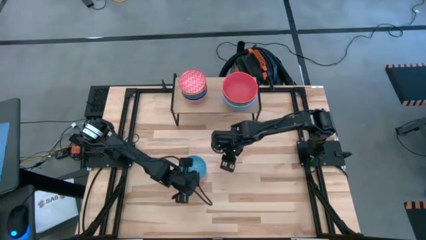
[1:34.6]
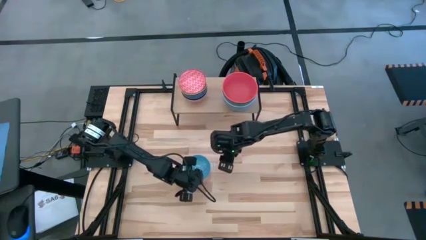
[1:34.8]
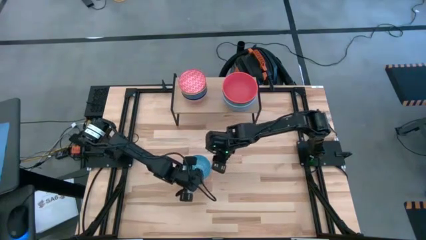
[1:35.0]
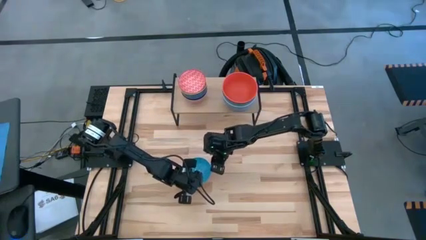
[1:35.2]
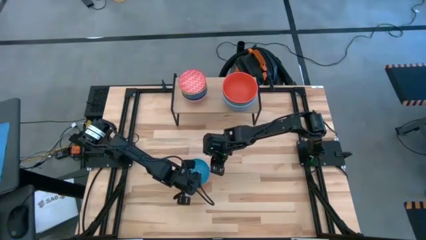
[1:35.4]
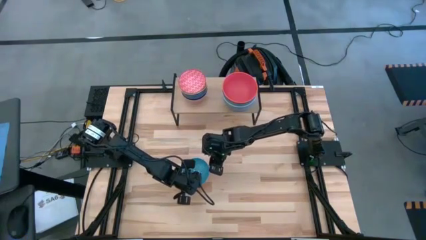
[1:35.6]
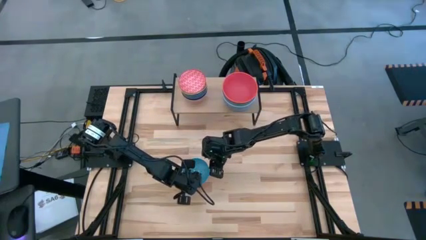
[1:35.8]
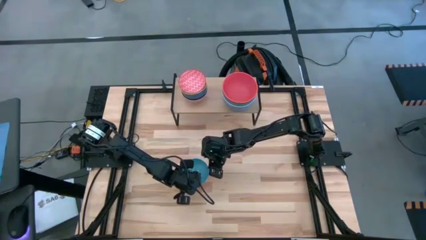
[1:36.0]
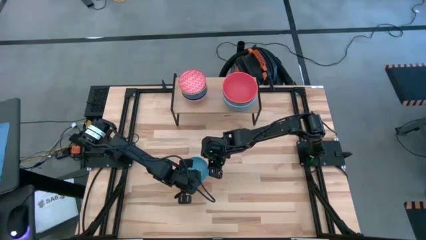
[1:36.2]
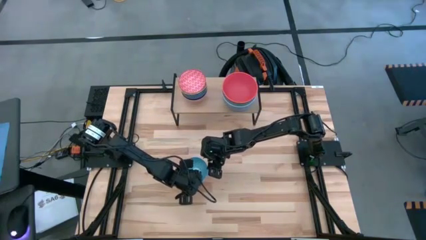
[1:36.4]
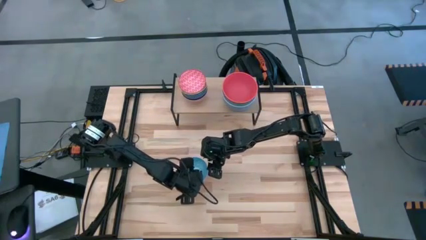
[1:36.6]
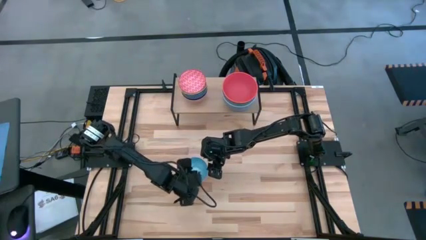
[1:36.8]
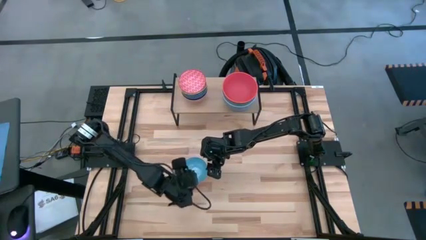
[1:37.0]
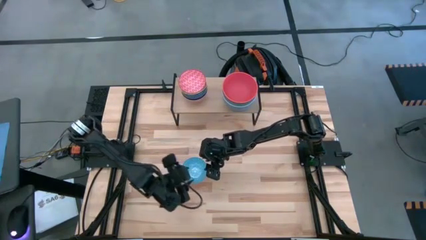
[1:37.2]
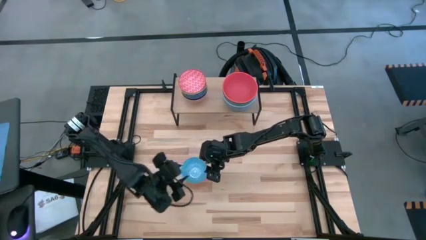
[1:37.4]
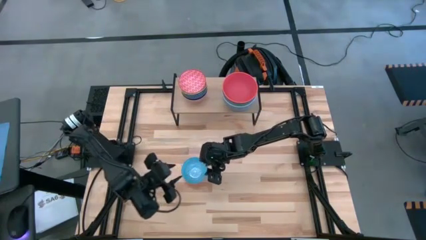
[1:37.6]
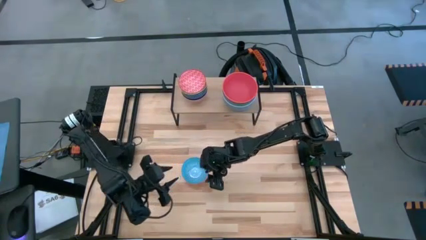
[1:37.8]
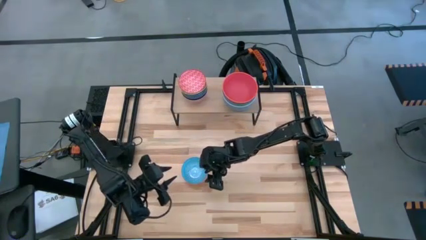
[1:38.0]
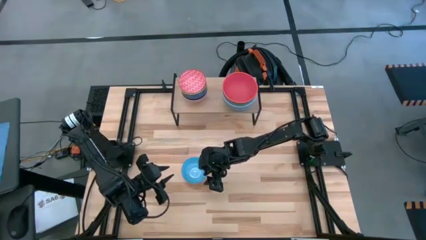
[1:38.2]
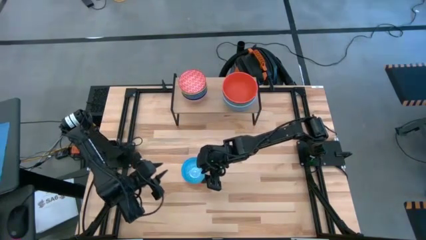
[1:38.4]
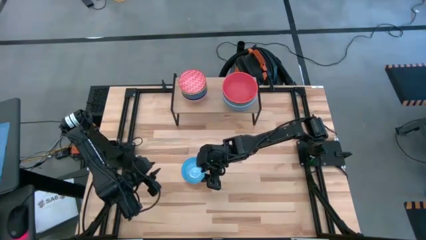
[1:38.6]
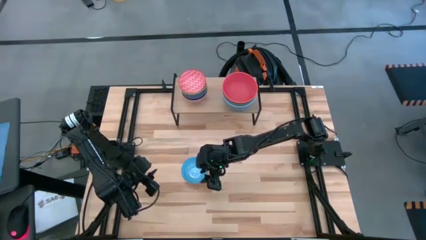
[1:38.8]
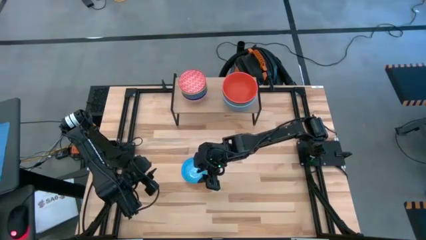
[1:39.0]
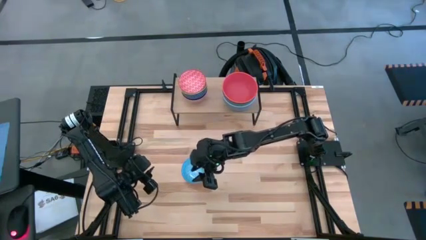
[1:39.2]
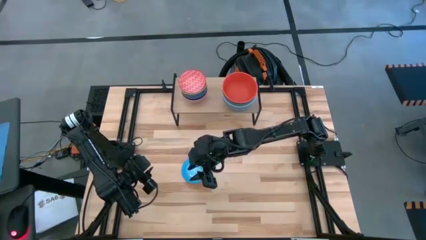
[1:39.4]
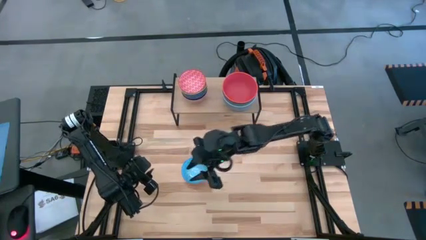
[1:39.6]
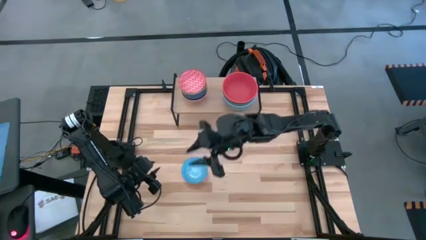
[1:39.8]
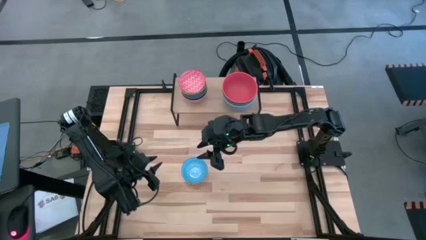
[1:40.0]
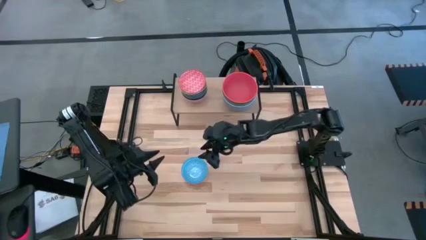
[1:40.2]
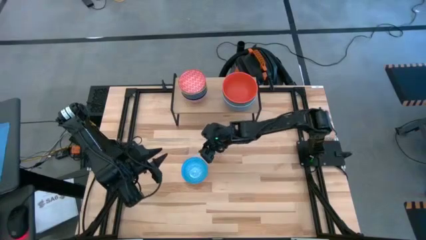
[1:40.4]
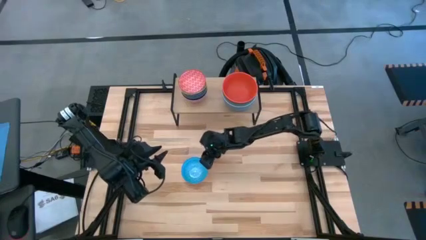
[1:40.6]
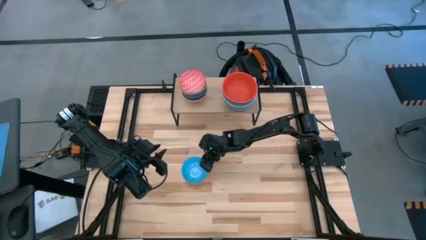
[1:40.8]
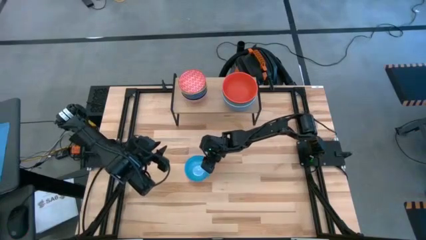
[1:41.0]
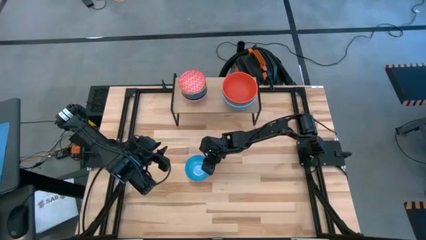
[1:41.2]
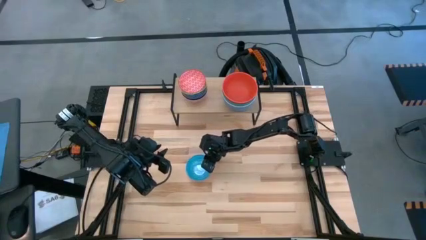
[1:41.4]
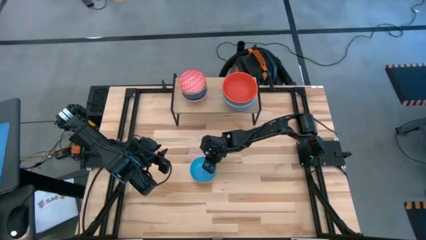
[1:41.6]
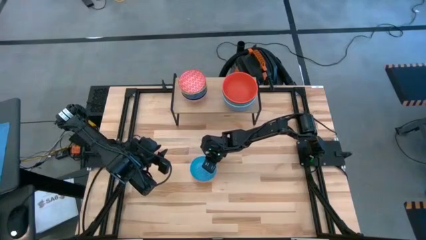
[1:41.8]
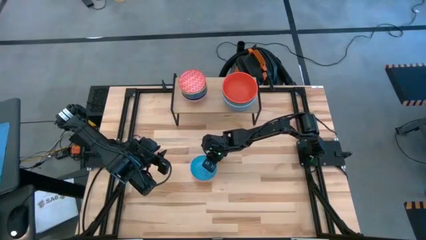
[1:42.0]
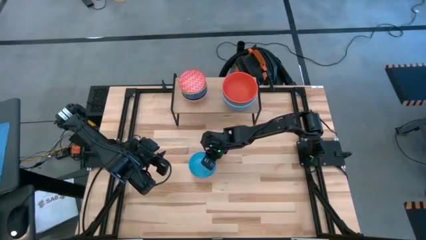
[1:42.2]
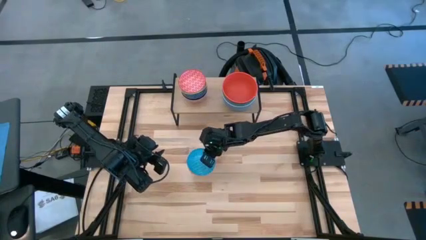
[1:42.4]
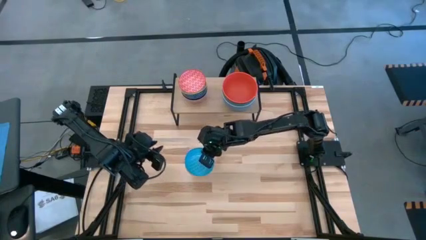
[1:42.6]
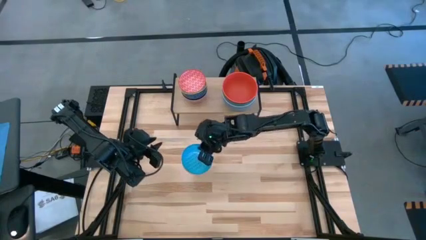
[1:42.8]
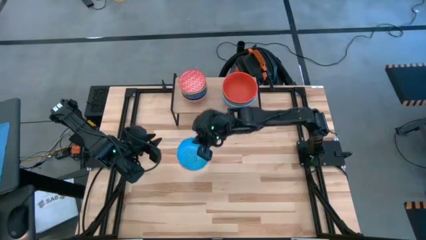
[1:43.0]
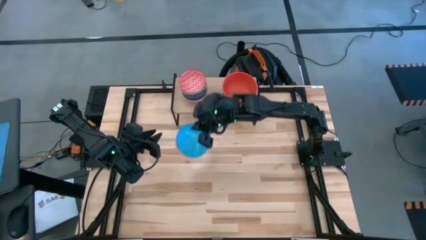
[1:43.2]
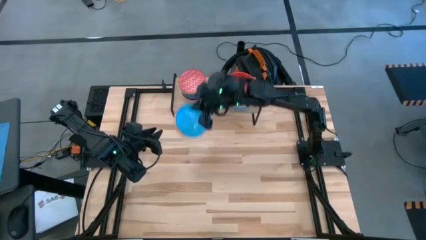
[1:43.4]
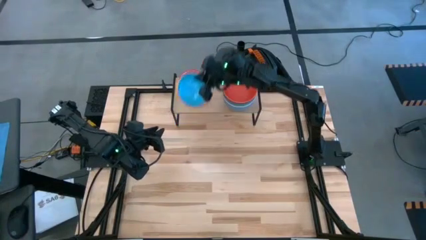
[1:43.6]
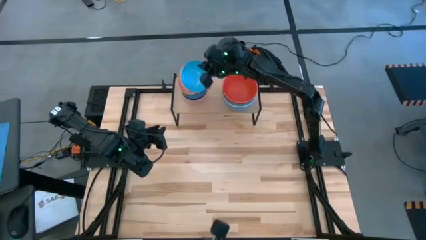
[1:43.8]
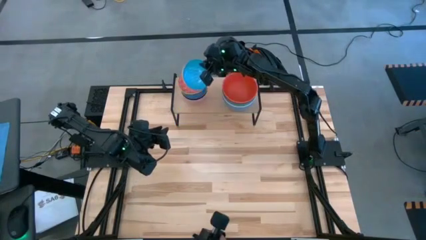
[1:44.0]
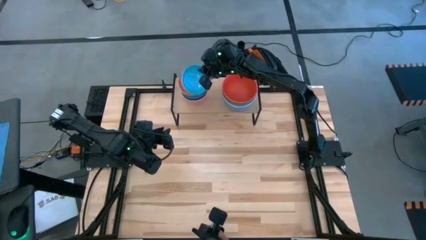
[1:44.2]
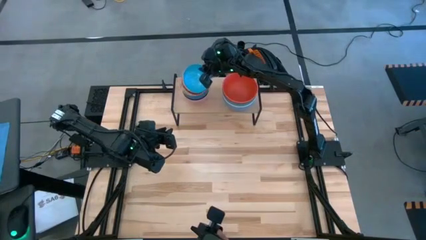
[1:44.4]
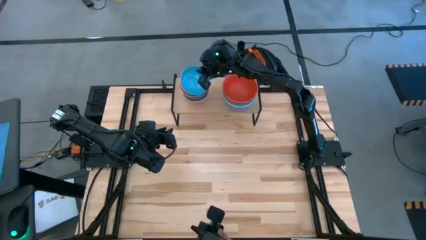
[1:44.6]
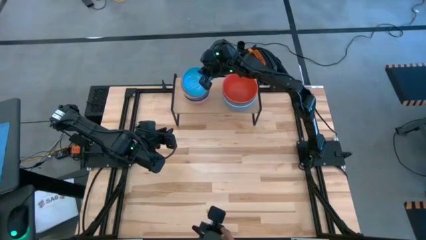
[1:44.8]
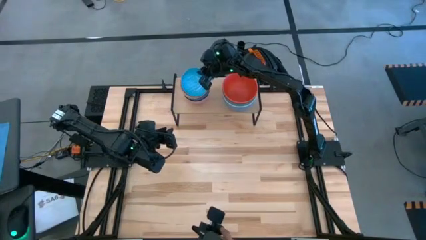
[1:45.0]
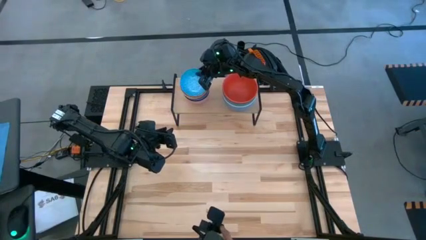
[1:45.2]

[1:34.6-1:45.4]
Task: Place and stack bowls onto a shelf
Stack the patterned light blue bowl on top of the patterned red bowl on the shelf
